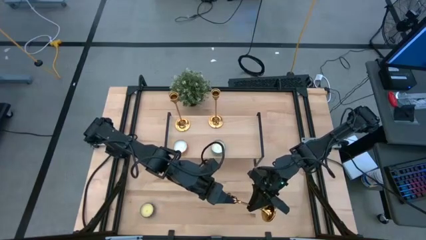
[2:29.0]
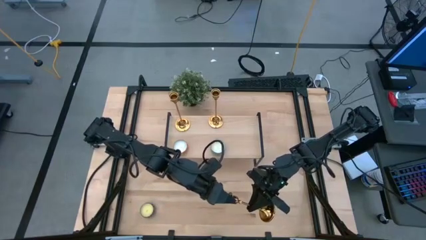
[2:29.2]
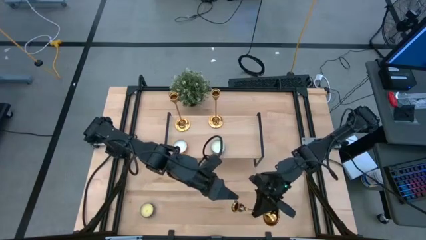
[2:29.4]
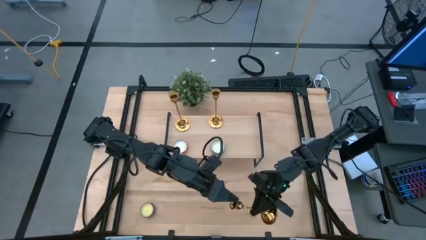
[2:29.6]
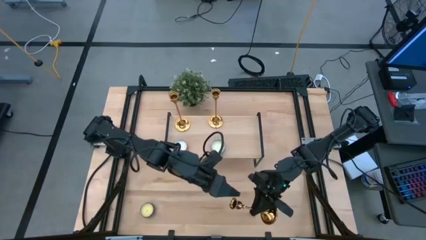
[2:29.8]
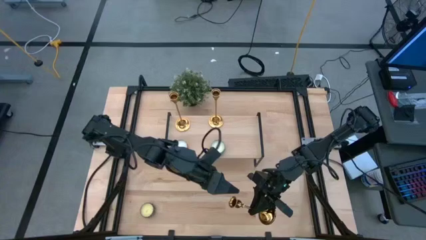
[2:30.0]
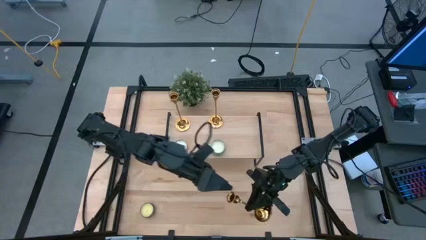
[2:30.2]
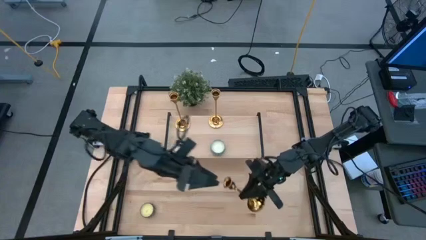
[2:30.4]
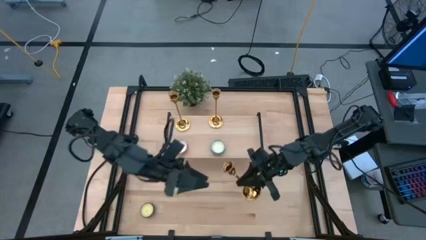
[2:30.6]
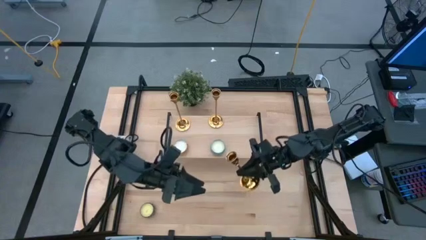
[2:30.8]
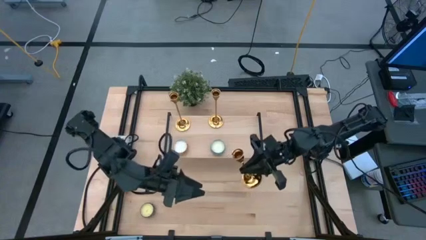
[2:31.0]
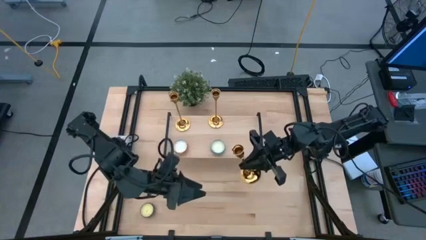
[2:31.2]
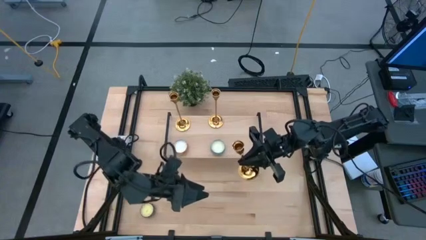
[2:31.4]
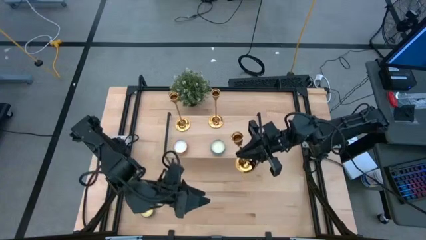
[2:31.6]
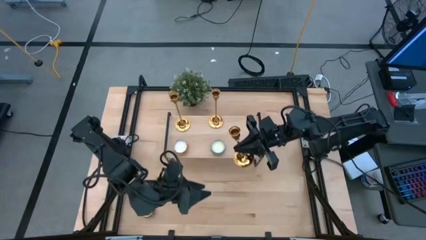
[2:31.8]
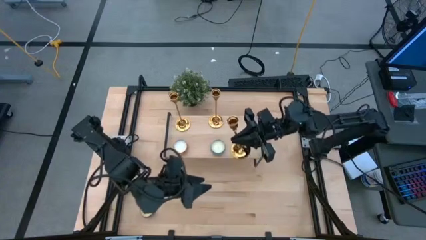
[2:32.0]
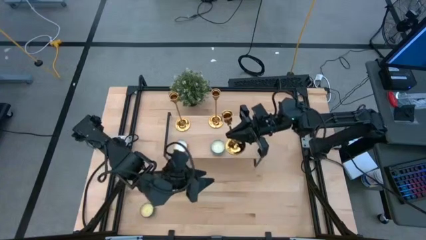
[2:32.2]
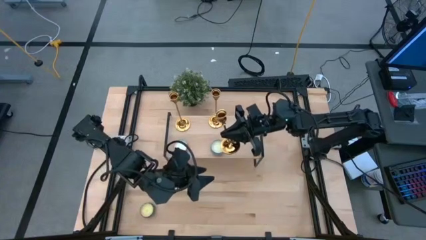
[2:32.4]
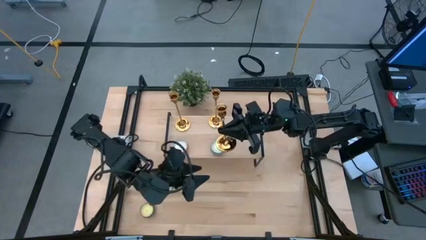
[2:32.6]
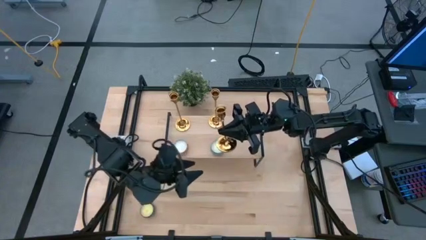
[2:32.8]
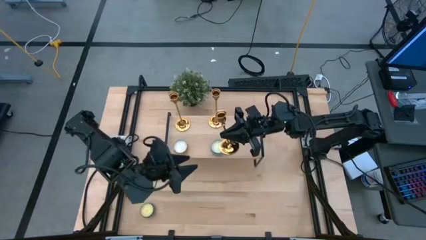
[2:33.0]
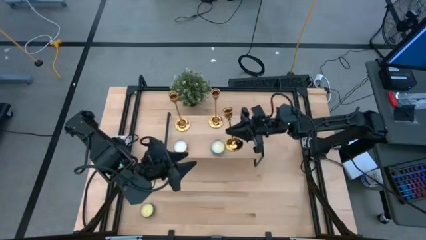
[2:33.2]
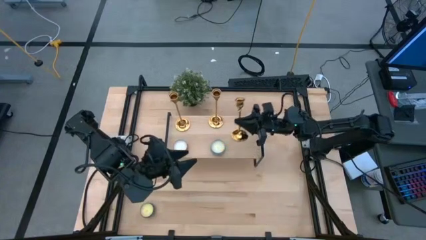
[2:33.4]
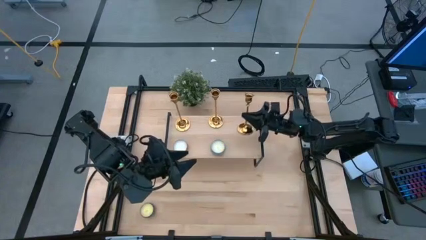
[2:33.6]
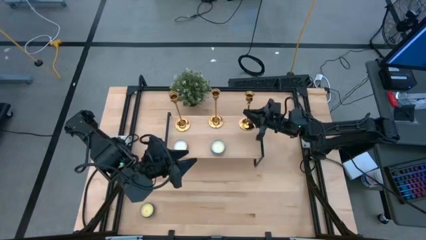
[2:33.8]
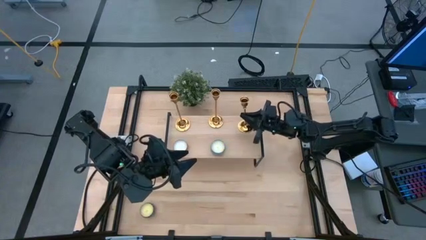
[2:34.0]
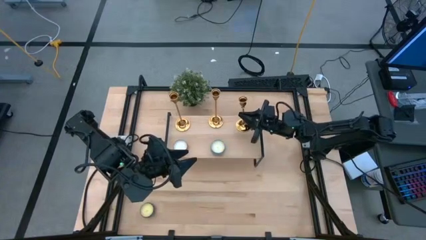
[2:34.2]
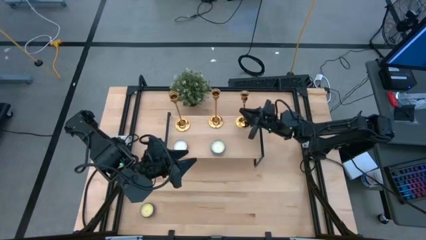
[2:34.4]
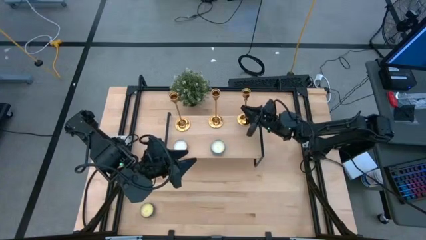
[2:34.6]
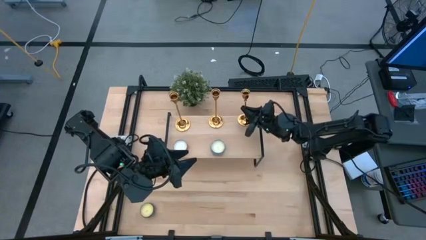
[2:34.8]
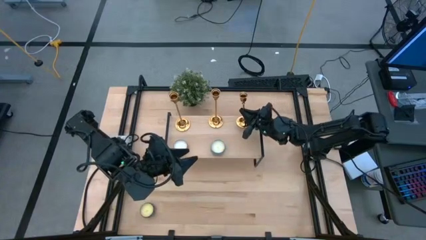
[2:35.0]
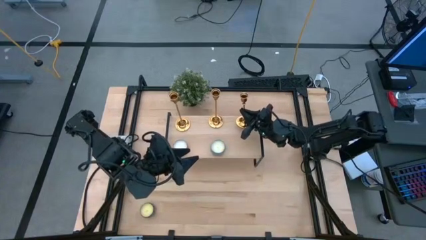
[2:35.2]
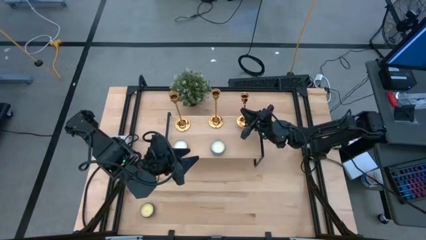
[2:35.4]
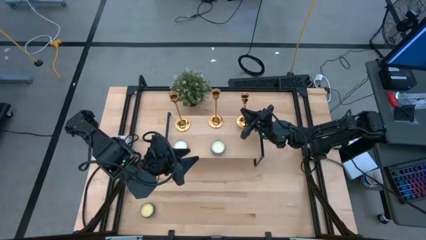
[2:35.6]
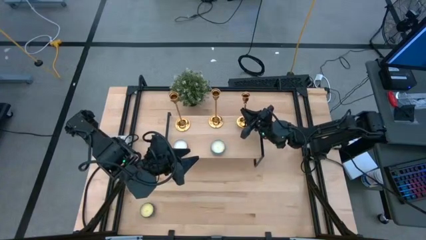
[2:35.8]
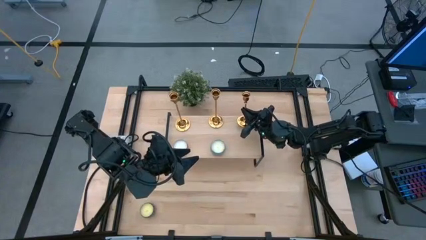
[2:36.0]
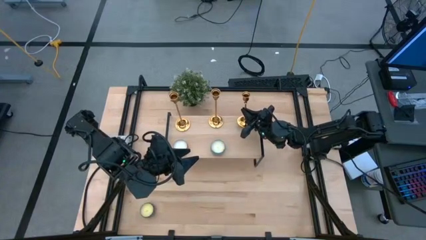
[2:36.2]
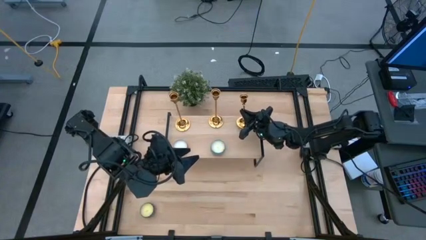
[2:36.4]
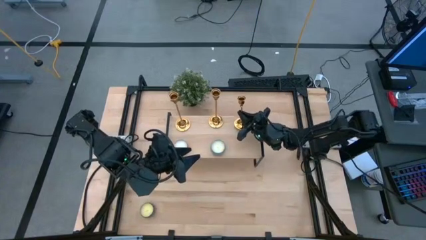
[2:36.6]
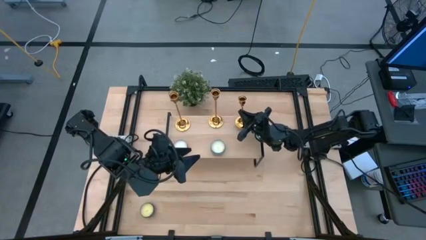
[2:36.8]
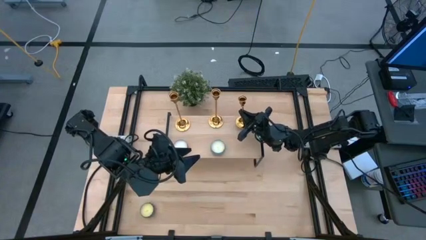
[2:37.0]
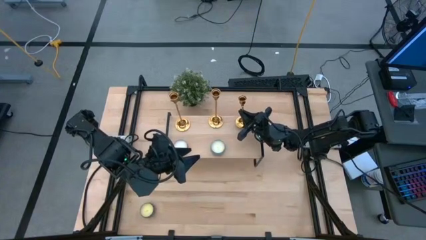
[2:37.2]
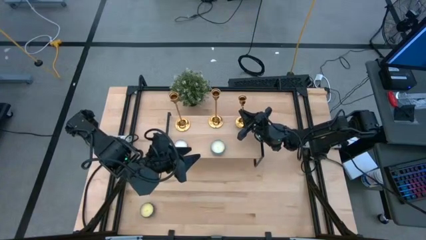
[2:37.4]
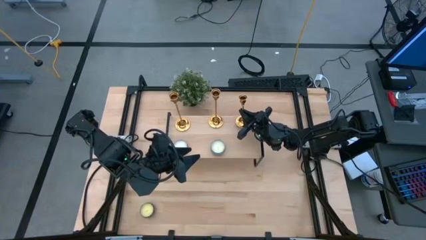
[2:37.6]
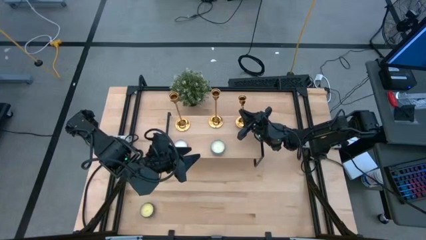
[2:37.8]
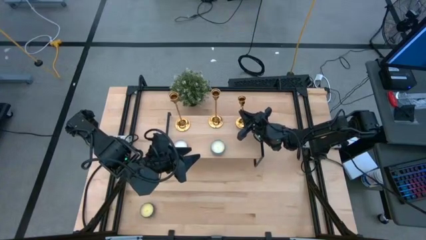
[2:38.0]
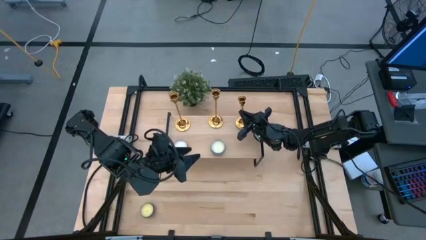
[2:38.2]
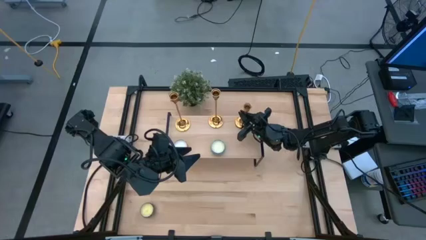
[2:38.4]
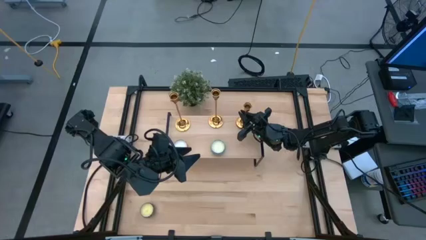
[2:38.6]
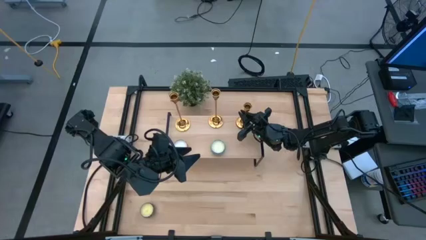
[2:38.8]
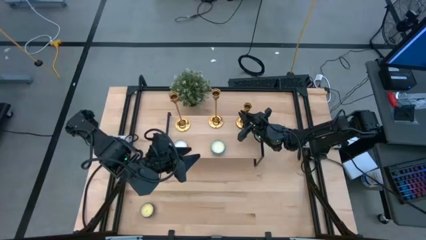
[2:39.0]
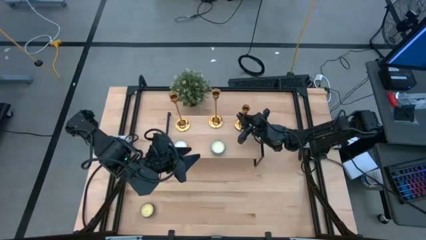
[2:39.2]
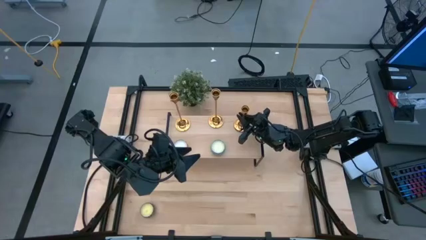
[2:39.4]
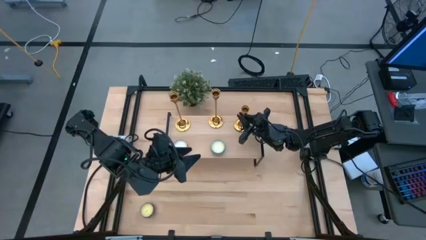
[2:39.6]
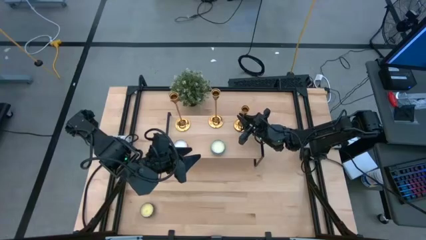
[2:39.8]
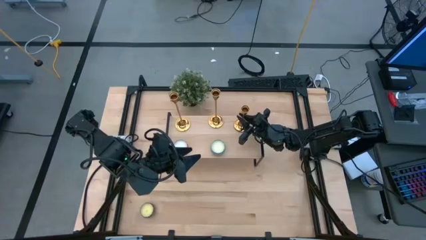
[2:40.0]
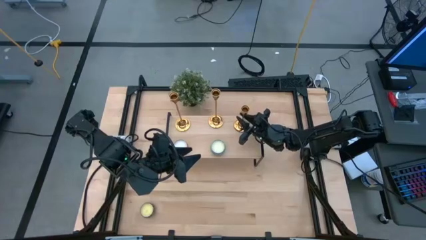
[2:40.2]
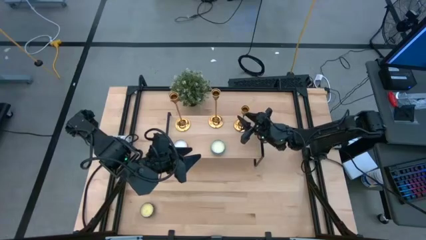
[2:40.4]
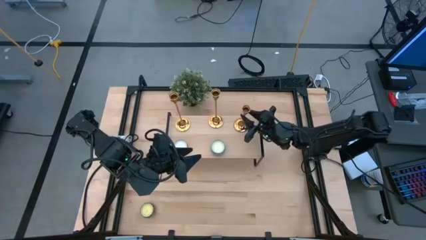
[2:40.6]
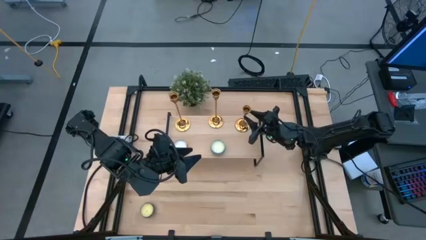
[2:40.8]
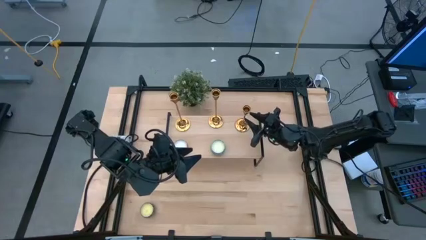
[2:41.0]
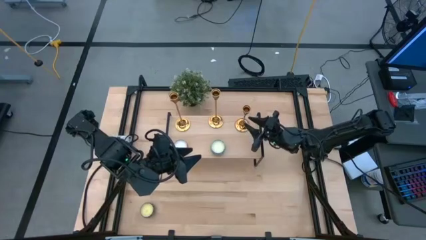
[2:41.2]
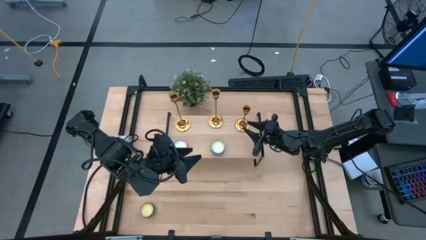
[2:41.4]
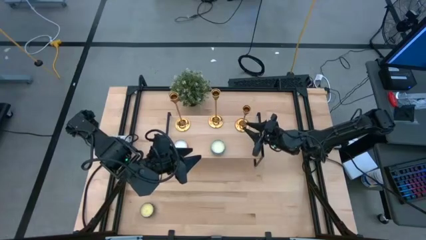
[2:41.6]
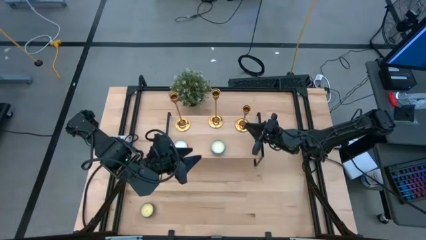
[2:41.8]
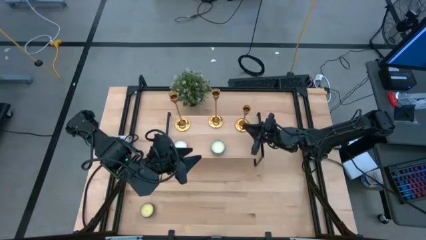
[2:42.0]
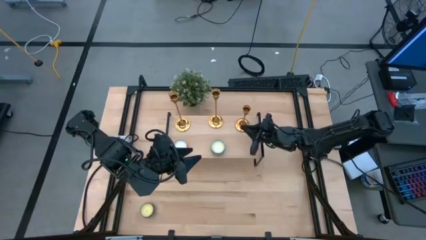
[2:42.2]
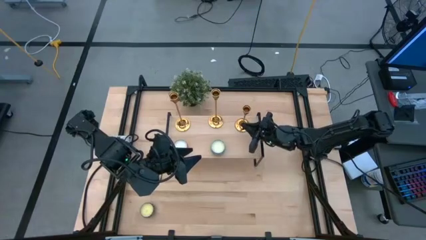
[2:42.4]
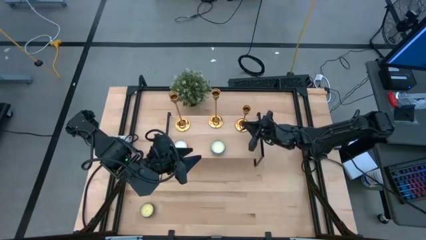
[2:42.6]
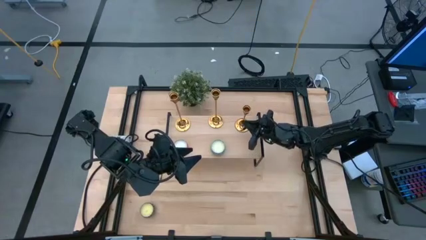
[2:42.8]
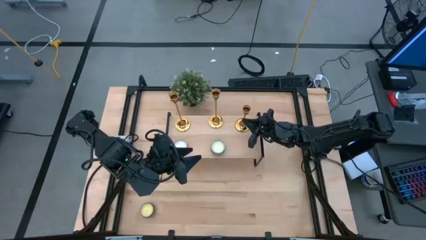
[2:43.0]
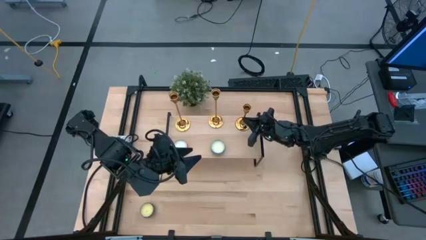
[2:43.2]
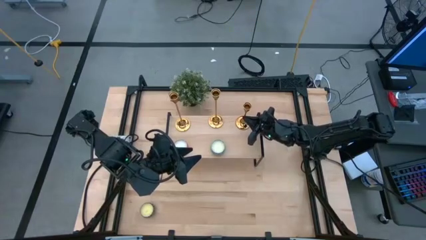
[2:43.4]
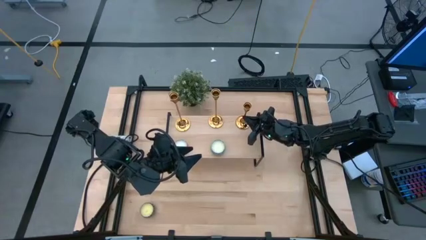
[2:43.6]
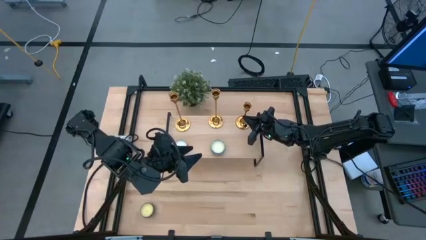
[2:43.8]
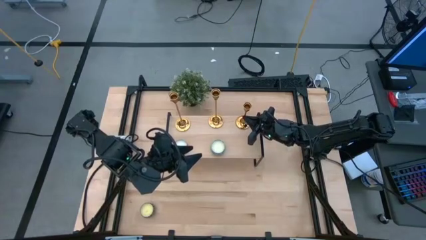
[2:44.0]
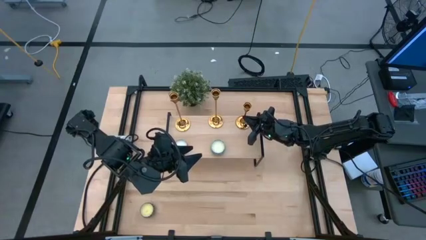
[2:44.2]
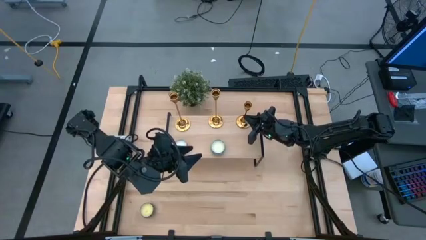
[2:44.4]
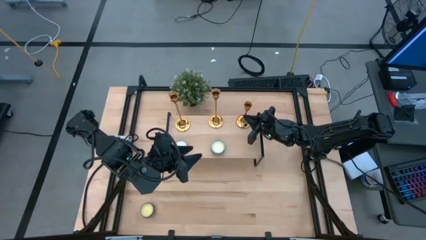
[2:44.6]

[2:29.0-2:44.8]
Task: Stock candles and holders on shelf
Align the gold candle holder with the other gold candle holders on the shelf
